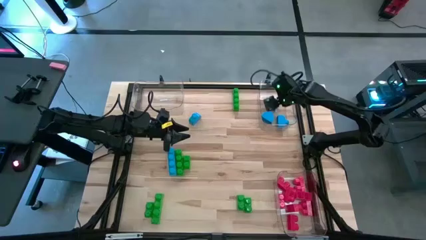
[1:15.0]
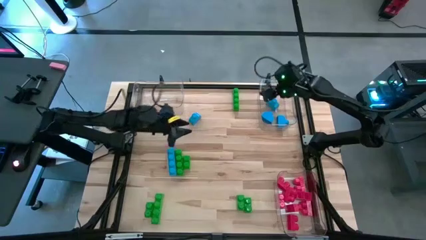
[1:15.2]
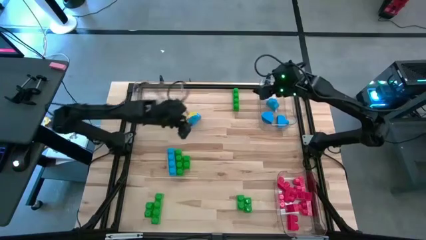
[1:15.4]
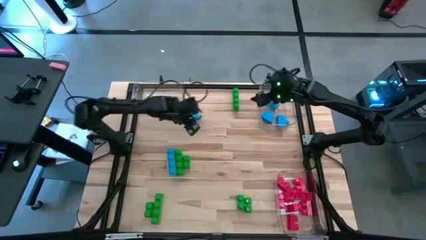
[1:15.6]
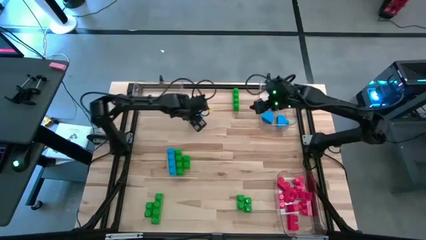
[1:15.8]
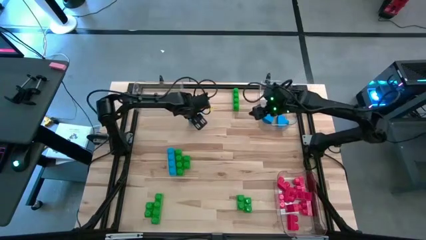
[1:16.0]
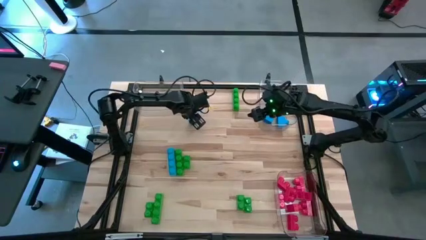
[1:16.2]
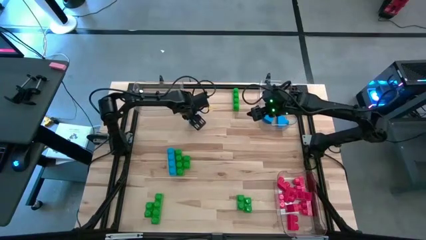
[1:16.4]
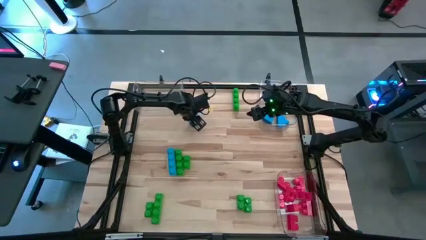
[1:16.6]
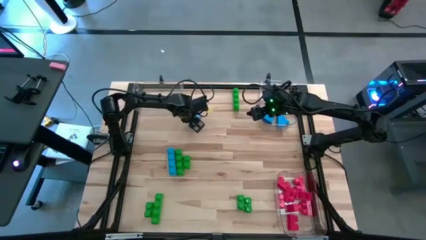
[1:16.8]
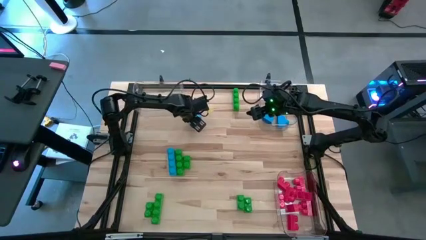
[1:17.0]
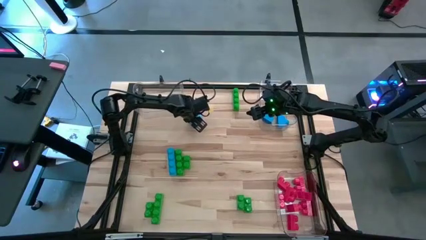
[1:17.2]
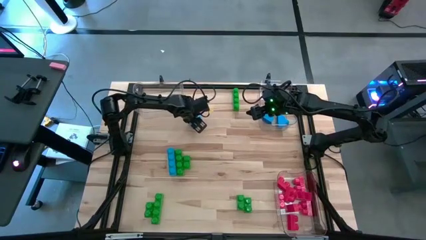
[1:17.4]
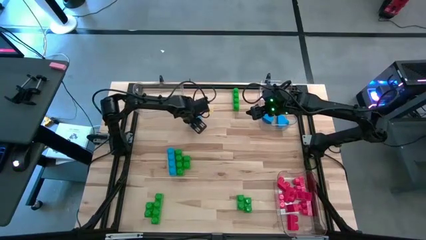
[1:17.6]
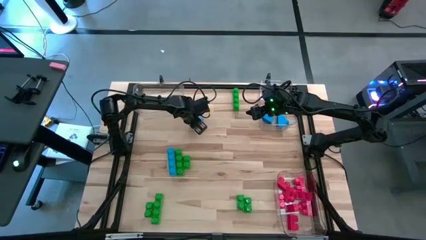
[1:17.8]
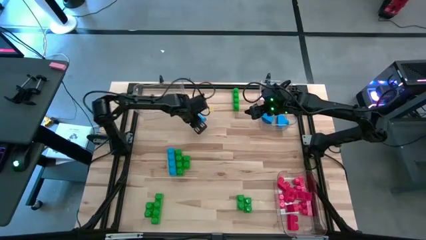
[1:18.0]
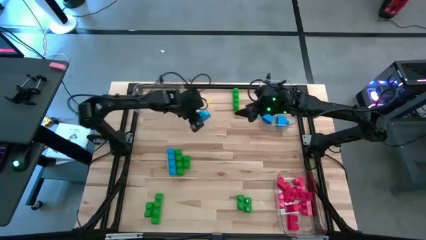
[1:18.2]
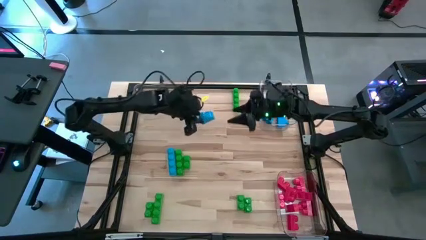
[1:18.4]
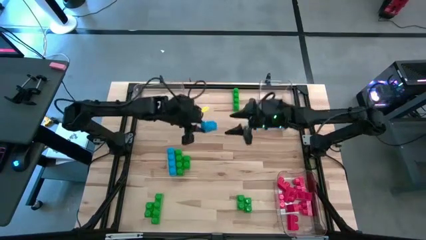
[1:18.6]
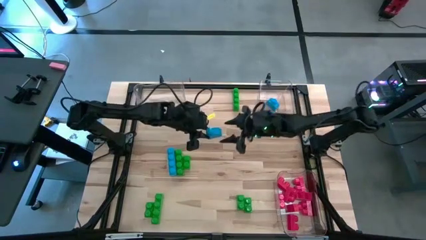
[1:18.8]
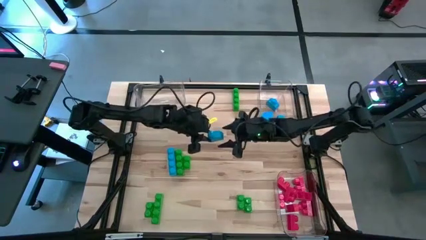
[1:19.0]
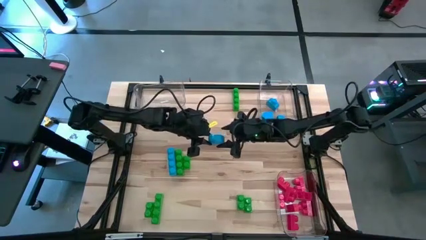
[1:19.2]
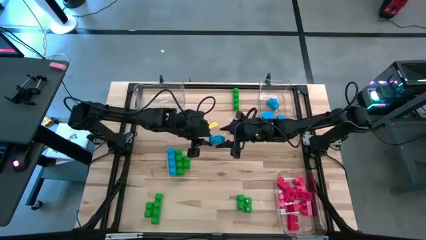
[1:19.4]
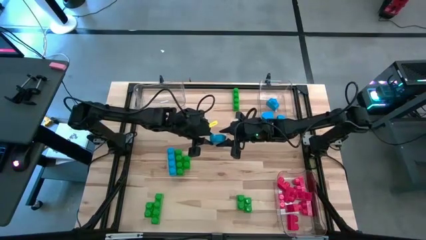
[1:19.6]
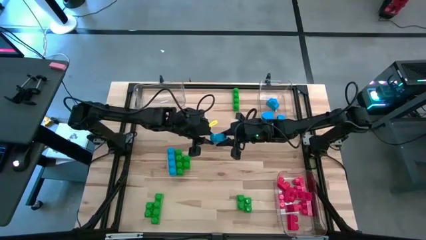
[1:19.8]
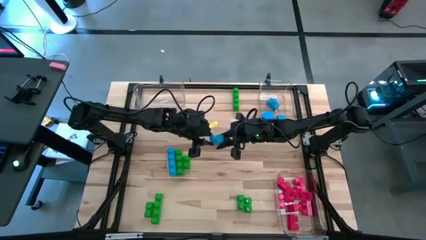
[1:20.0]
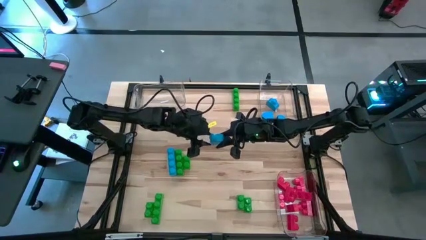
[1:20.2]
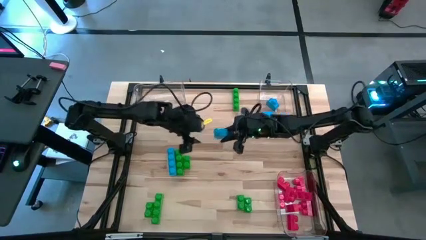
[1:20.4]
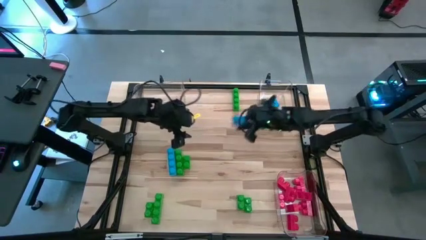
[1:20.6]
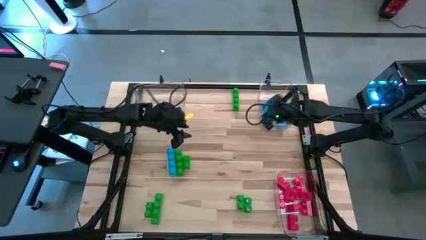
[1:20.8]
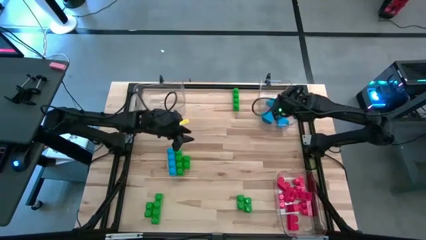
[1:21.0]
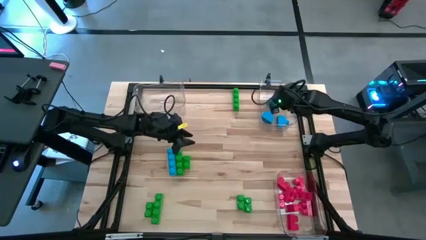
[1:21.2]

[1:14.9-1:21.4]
Task: Sort blocks
Put the blue game piece into the top right transparent bin

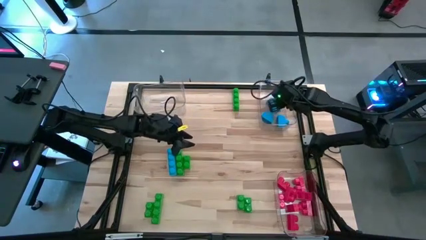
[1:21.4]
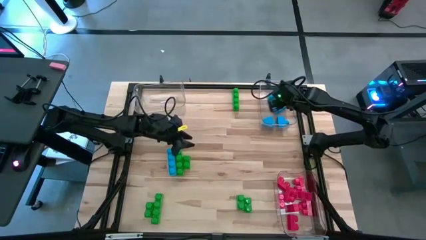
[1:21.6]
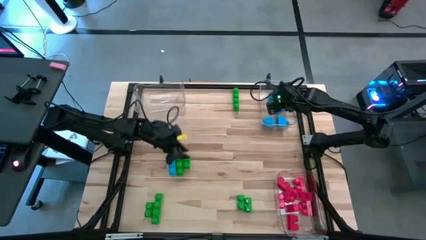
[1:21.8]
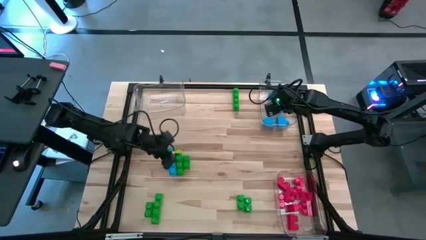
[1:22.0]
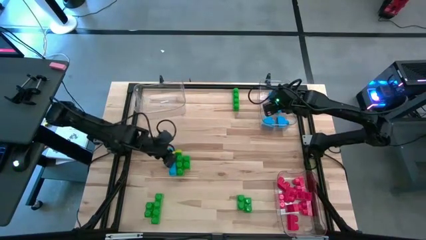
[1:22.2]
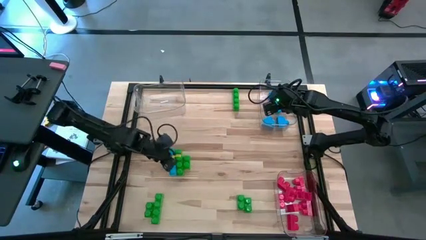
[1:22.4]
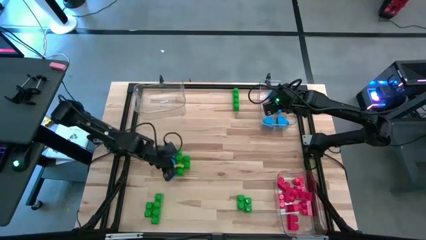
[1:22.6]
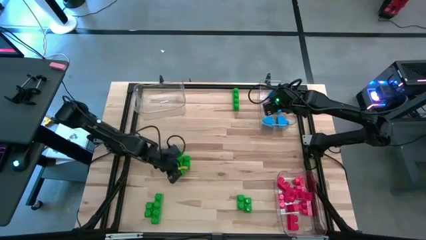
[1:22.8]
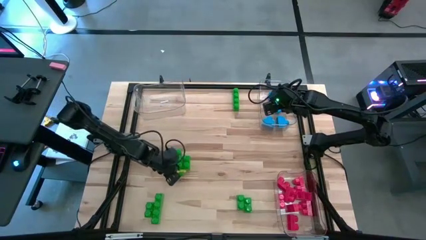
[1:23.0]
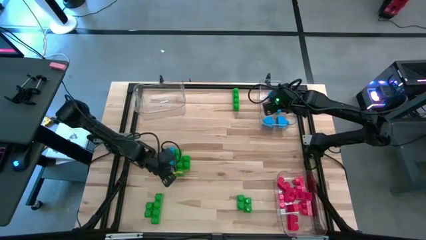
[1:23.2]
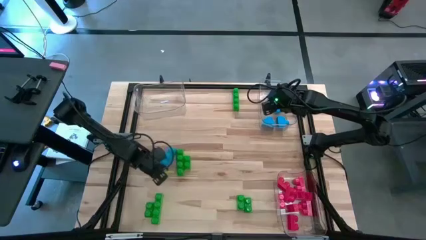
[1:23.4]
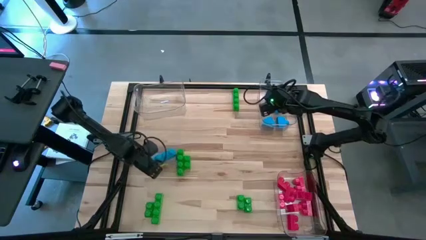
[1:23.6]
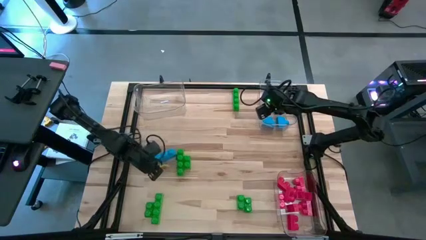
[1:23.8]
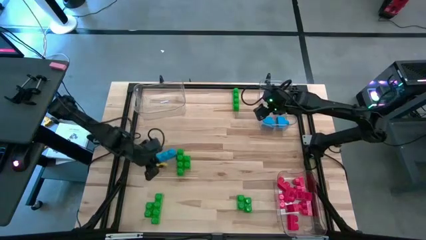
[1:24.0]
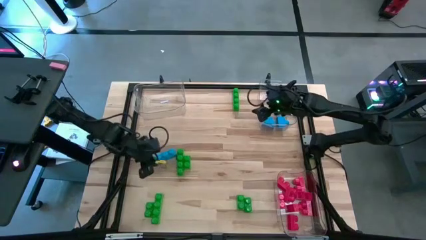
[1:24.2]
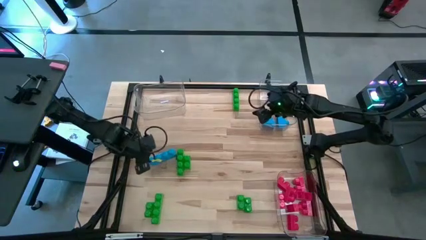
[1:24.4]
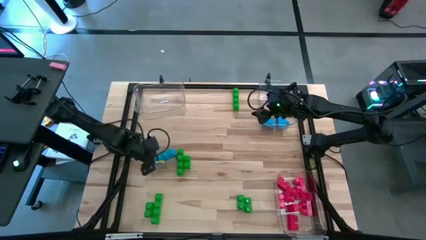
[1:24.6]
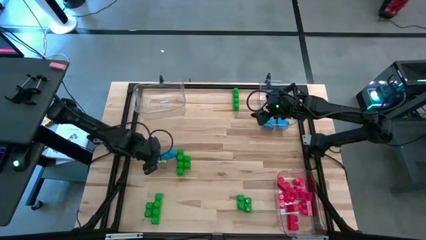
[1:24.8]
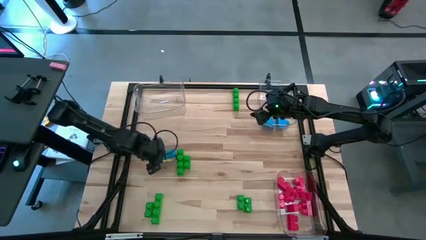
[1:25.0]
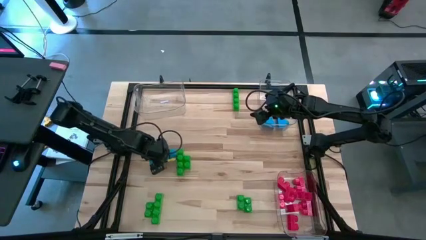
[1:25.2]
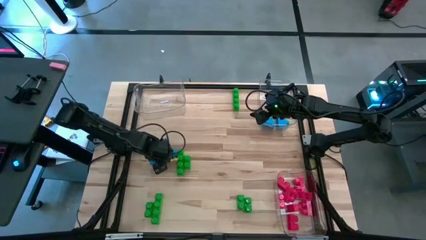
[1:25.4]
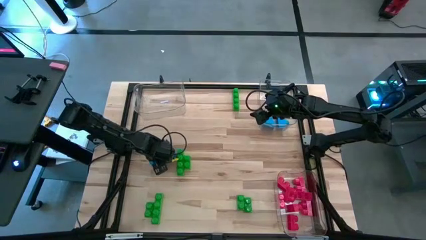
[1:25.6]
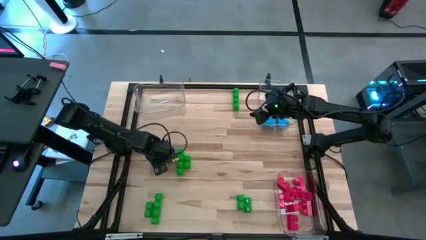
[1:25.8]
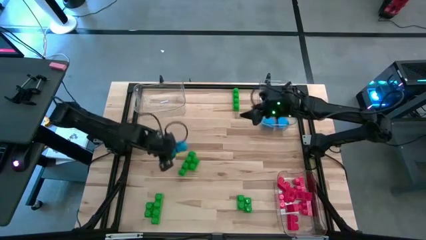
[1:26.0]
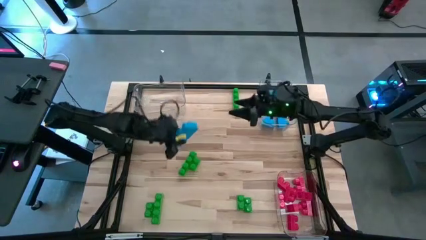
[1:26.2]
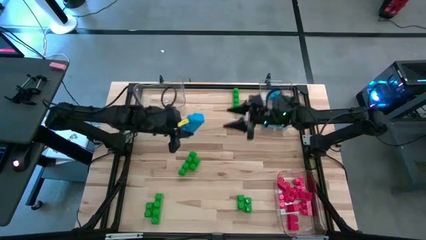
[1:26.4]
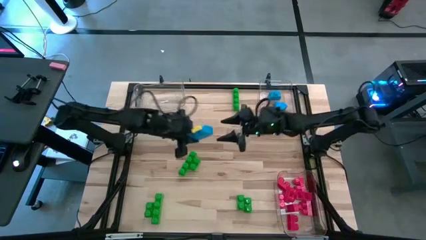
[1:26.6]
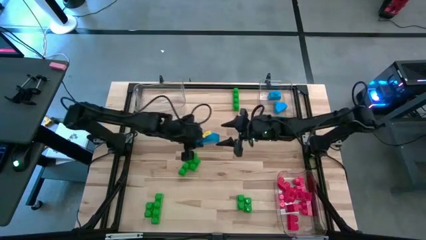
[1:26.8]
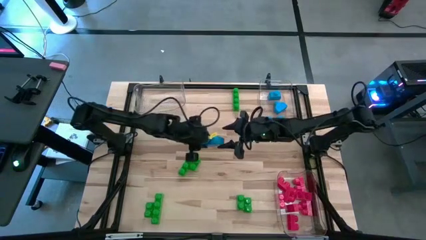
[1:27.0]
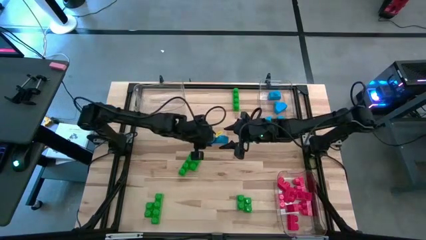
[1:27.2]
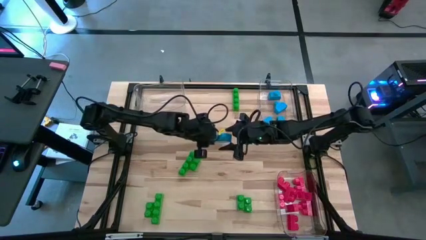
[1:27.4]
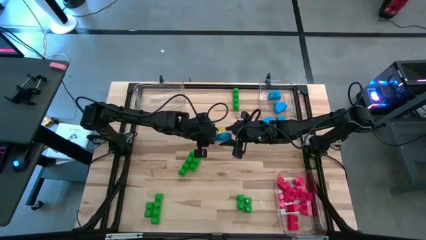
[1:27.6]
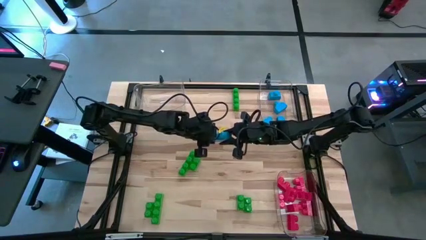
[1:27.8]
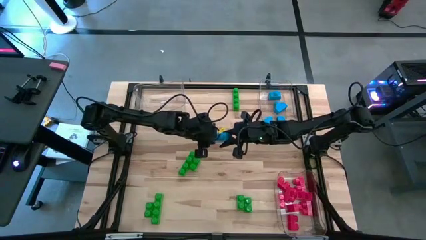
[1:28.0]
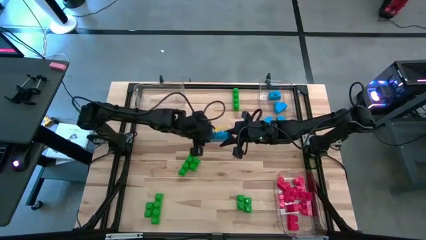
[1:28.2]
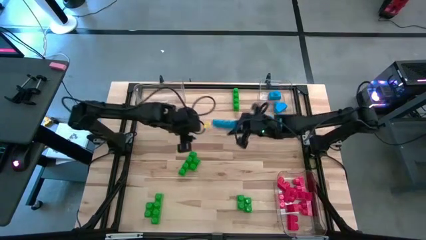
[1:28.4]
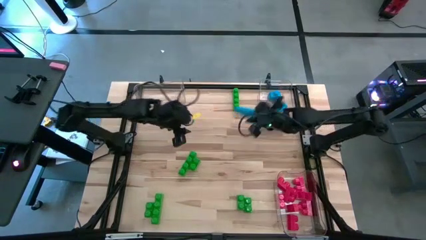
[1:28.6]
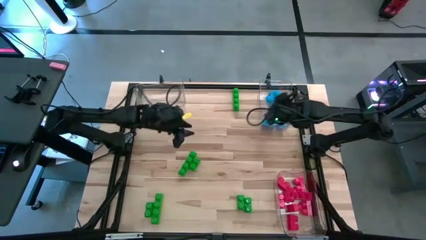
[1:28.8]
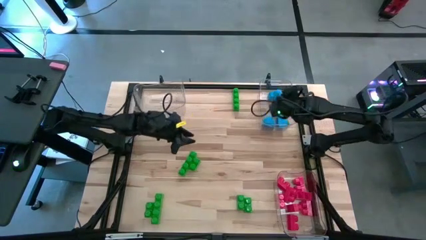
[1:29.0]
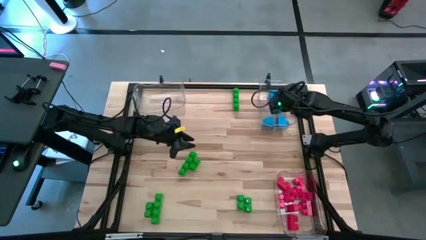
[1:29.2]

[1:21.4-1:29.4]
Put the blue game piece into the top right transparent bin

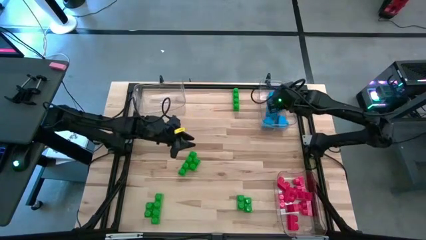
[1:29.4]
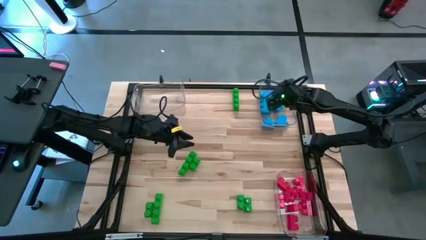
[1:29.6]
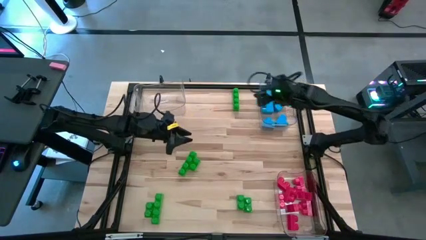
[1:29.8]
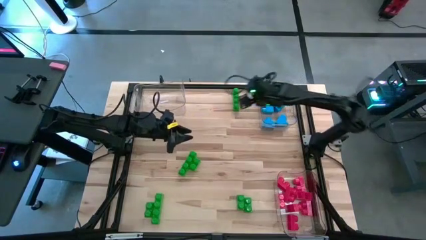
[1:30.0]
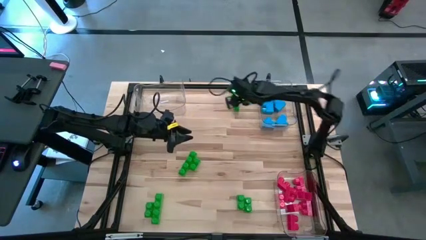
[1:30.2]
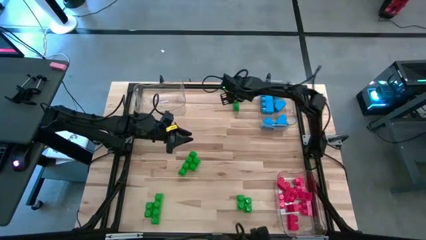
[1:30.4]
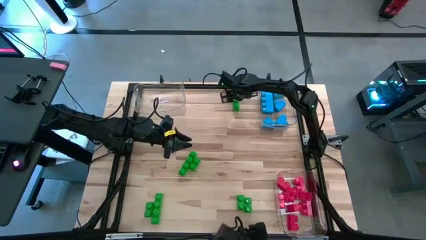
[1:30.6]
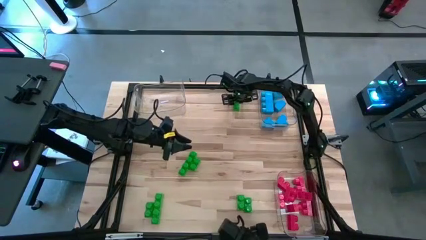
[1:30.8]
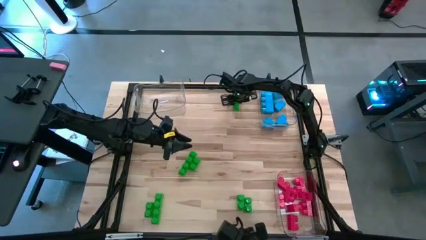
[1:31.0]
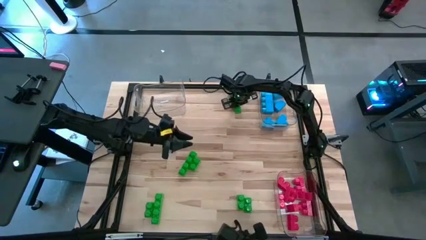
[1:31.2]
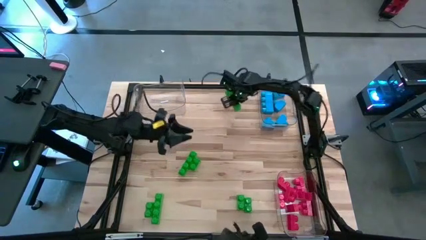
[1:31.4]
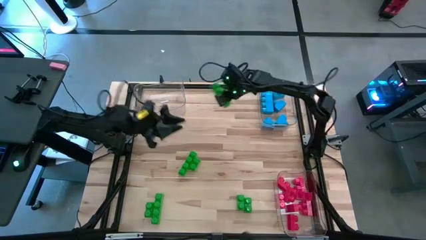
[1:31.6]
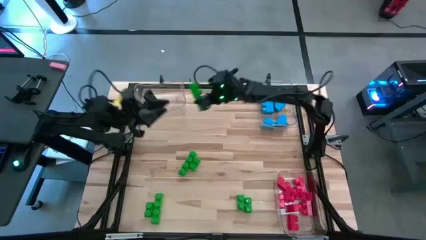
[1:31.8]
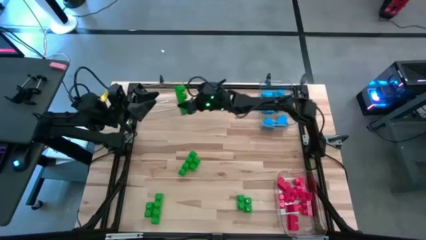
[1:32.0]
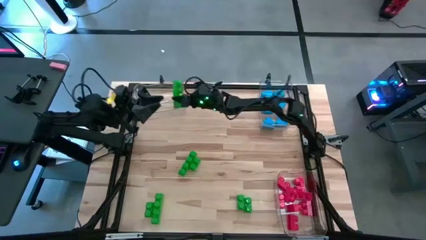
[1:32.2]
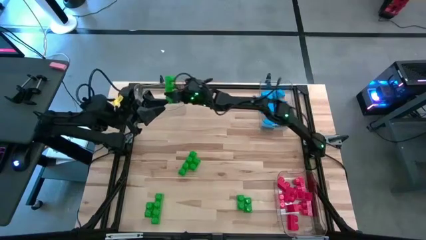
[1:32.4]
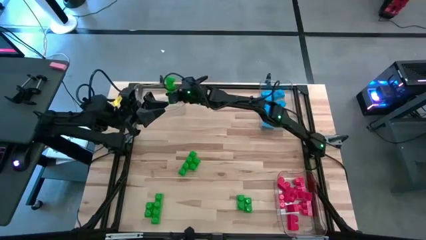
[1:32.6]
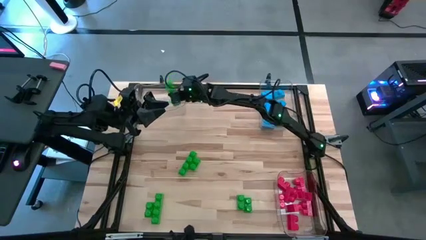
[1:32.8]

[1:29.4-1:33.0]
Put the green game piece into the top left transparent bin
